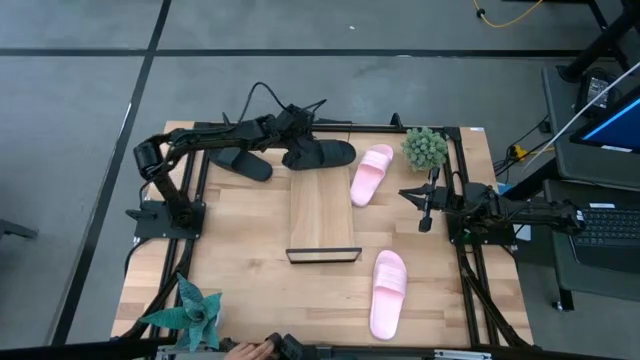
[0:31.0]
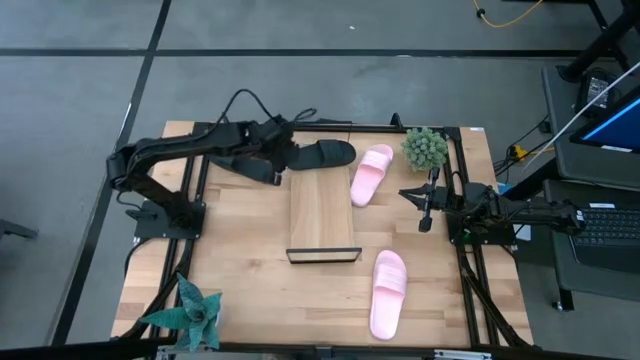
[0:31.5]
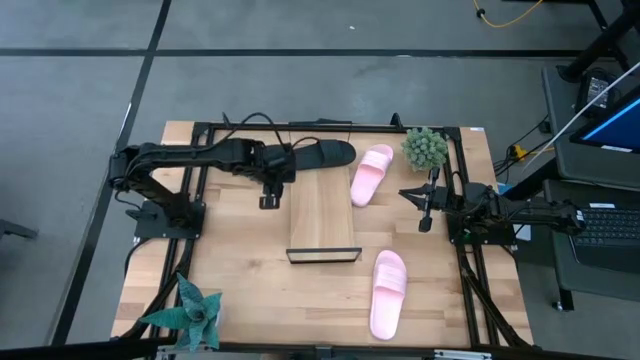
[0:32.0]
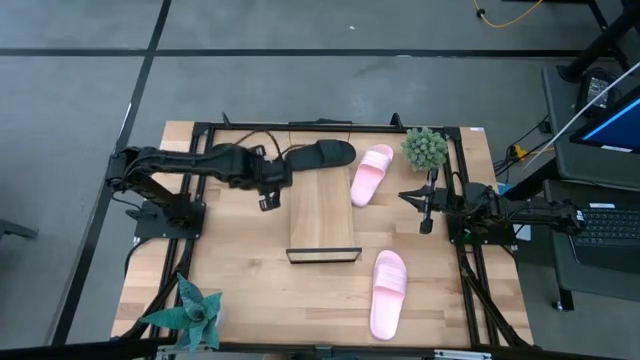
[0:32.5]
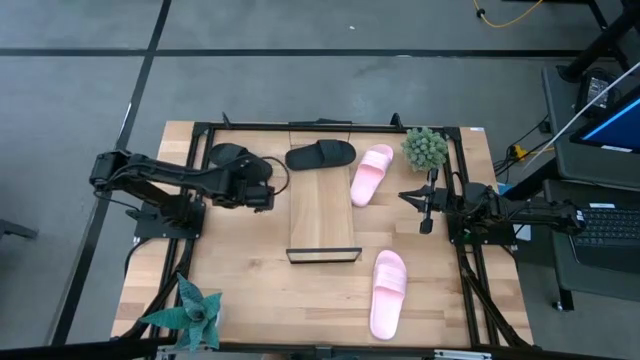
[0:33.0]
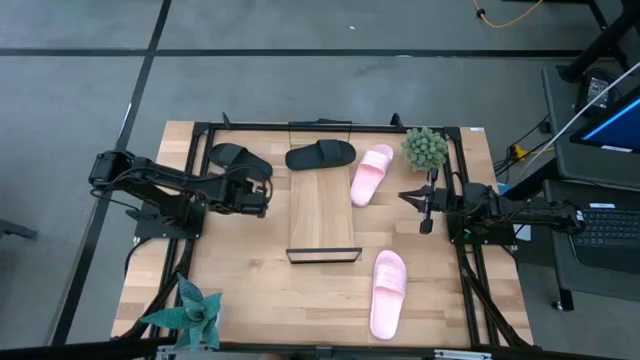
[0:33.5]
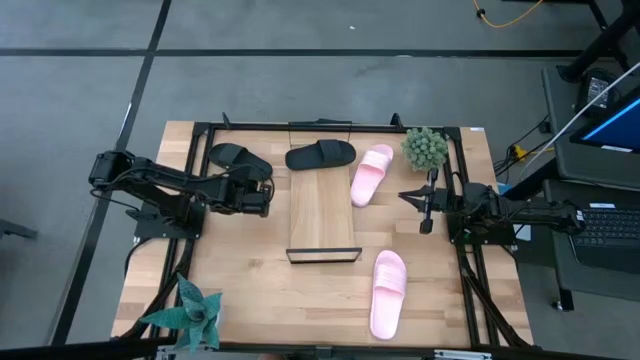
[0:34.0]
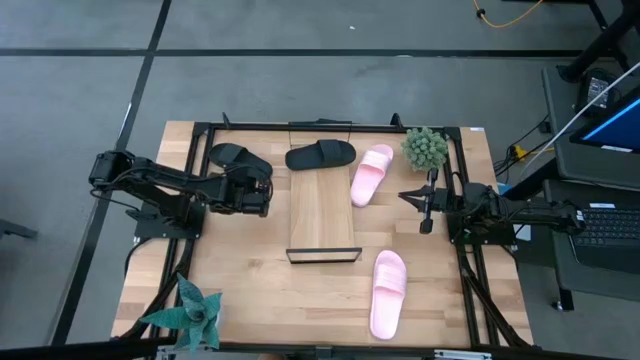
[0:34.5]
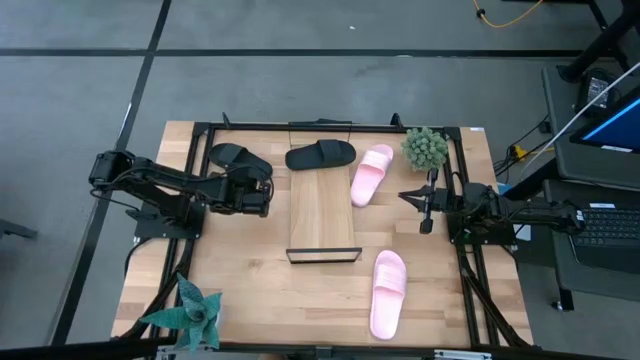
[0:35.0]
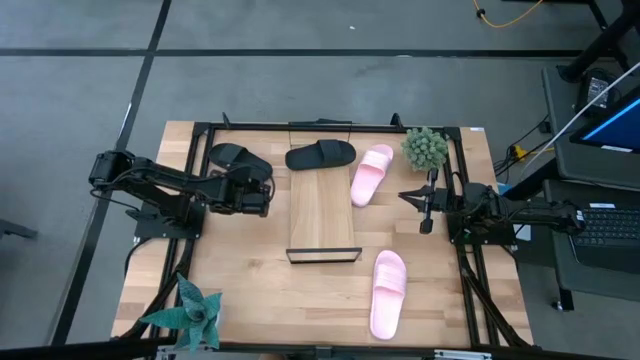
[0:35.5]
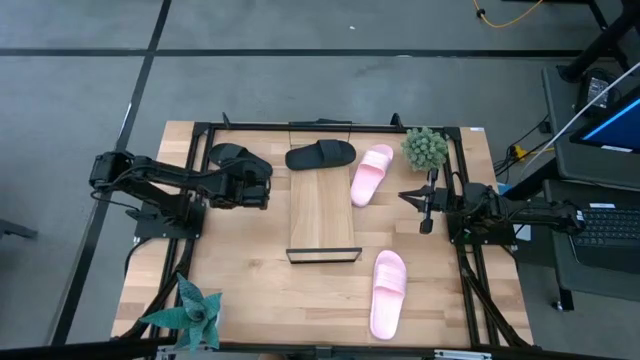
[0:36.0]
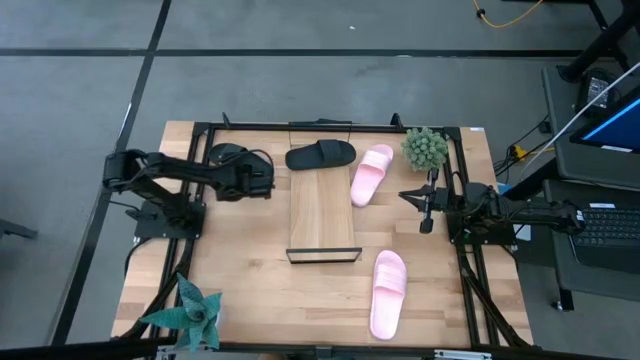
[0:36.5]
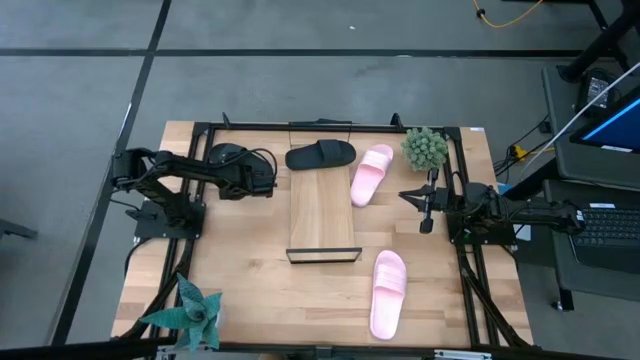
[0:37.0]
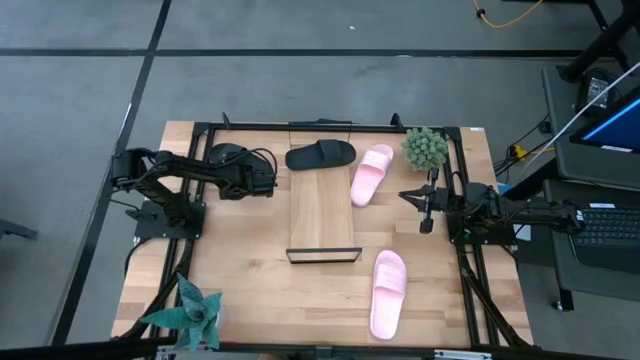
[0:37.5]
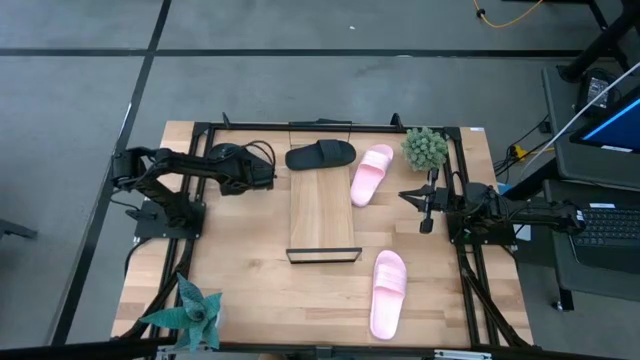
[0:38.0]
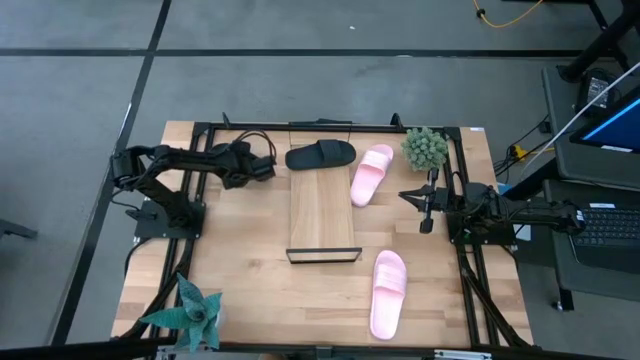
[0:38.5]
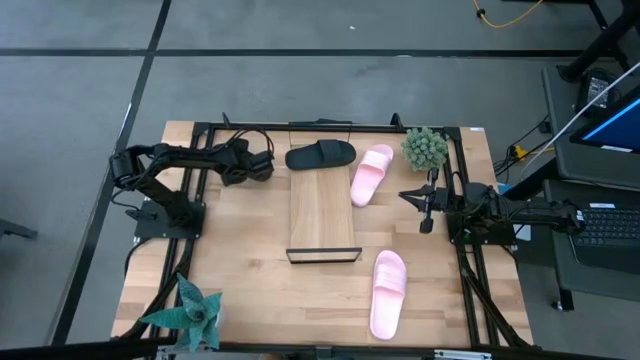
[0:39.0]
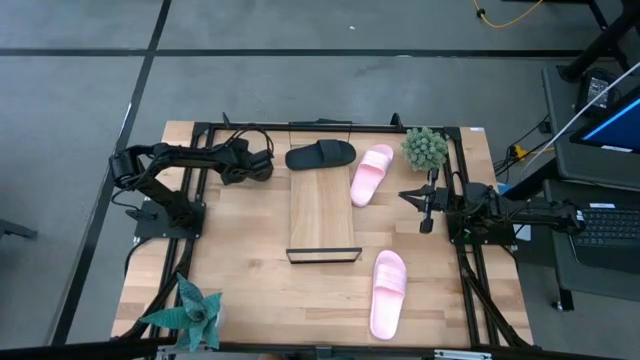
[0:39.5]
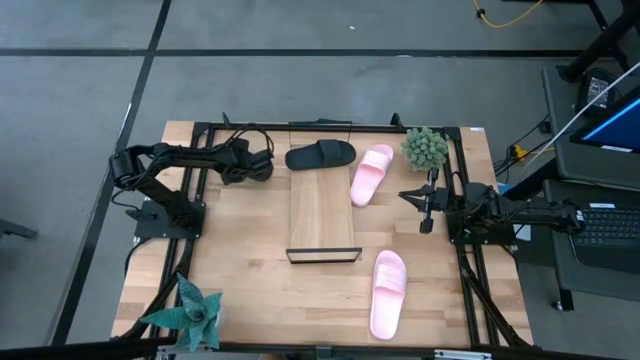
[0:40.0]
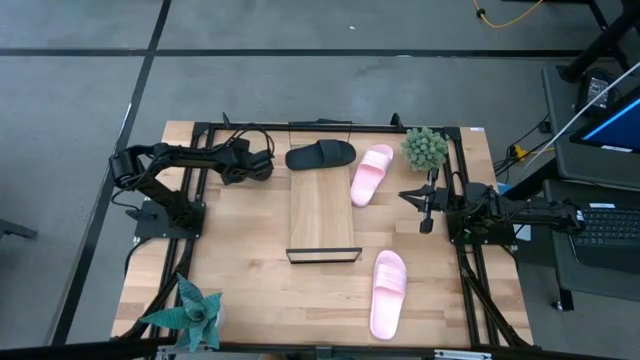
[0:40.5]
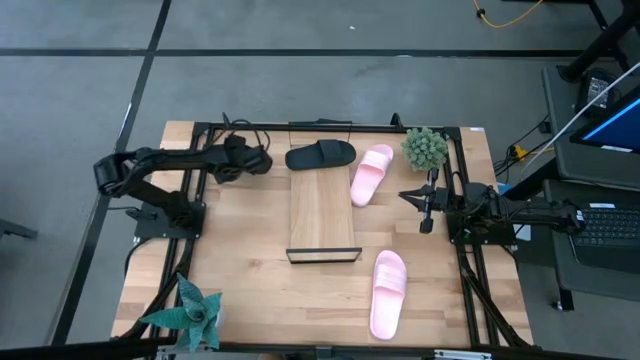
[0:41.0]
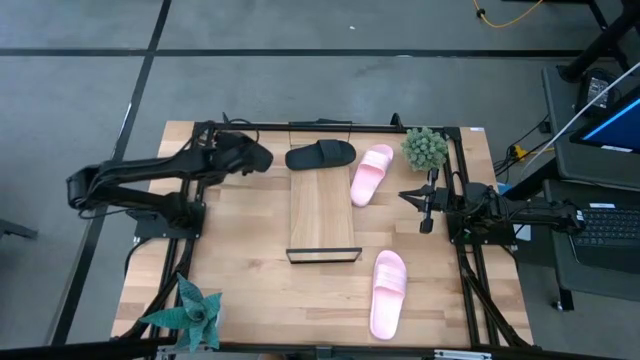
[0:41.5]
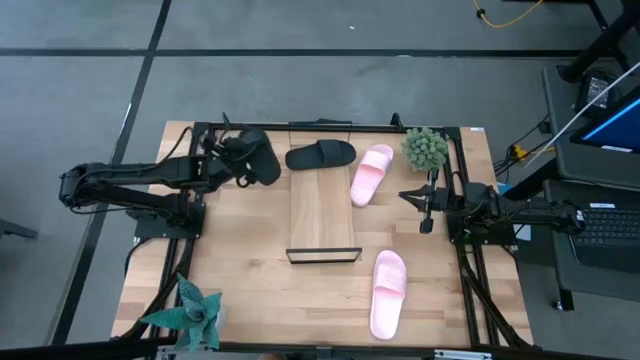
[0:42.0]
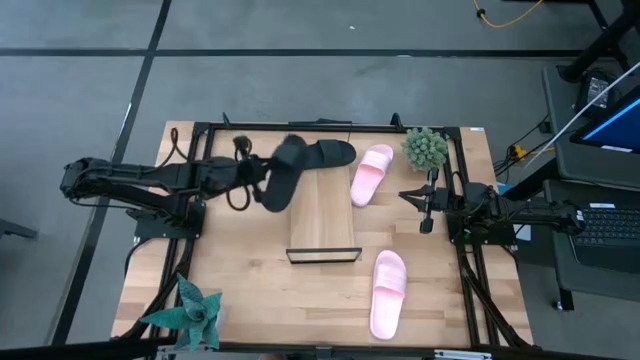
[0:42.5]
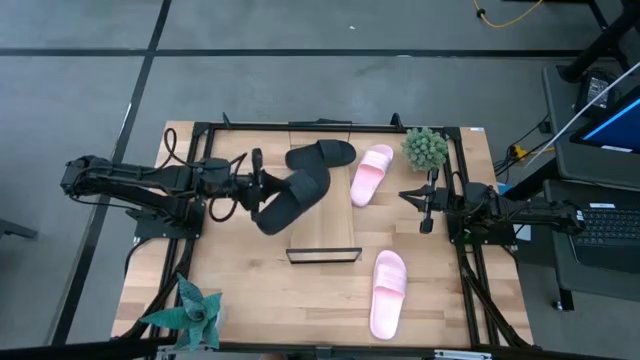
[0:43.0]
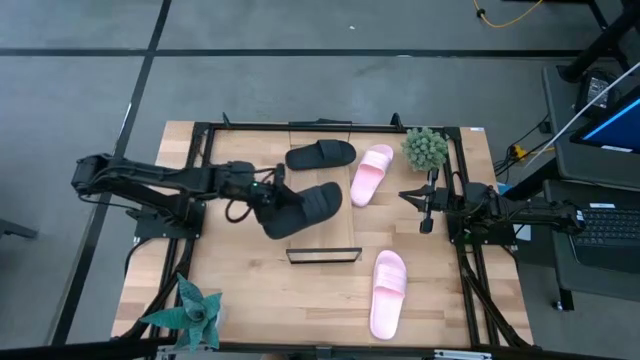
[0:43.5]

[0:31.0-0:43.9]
Task: Pick and place slides into the shelf
Put the black slide on the shelf

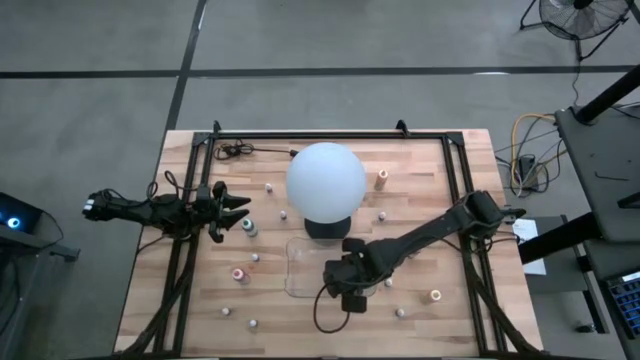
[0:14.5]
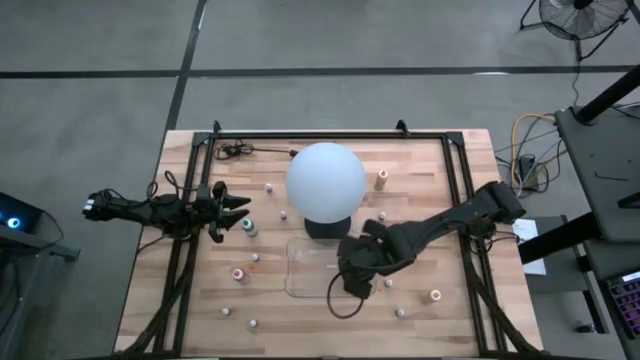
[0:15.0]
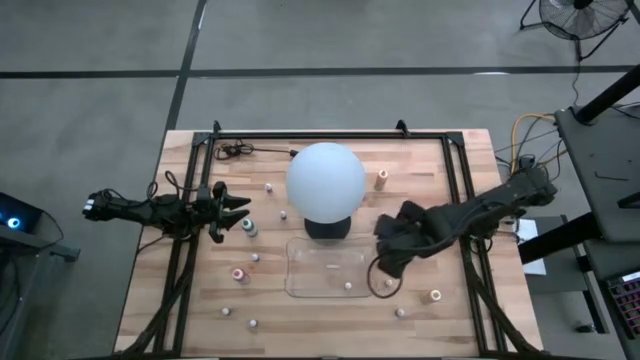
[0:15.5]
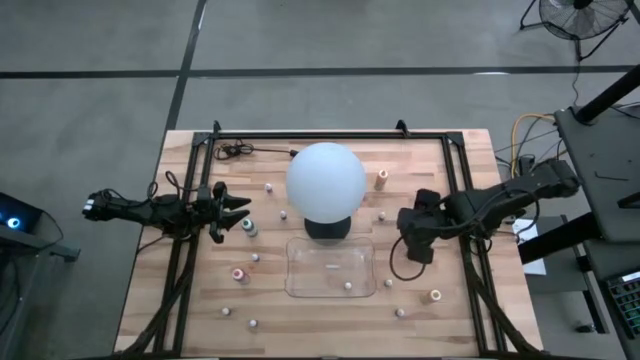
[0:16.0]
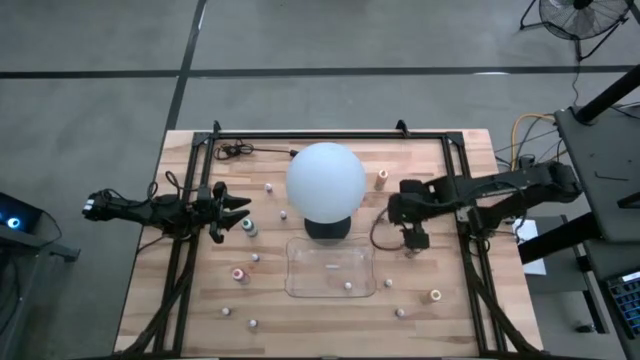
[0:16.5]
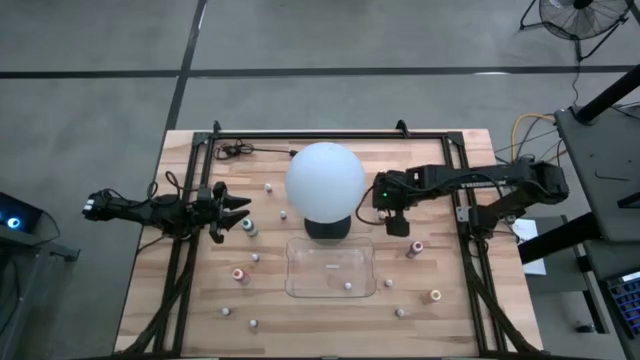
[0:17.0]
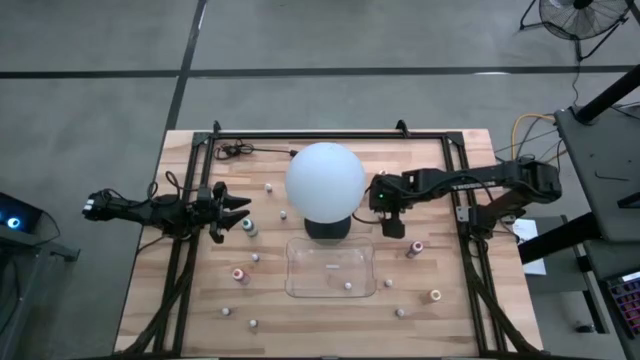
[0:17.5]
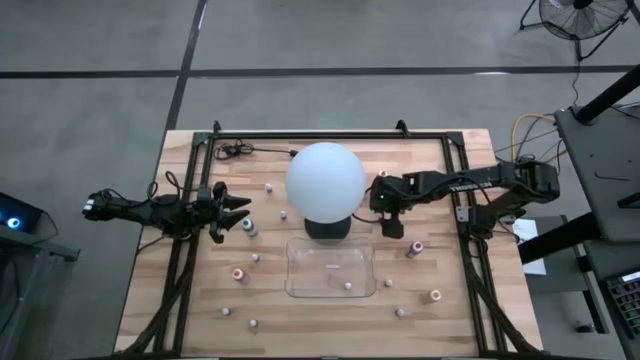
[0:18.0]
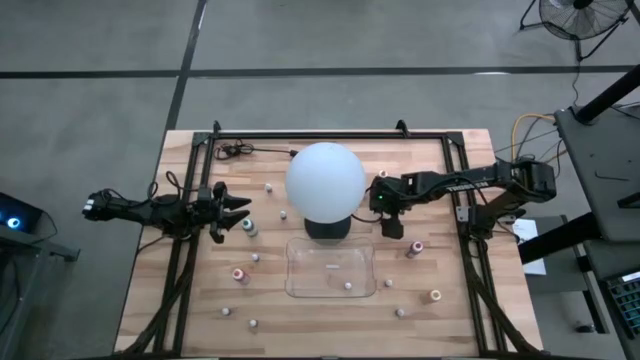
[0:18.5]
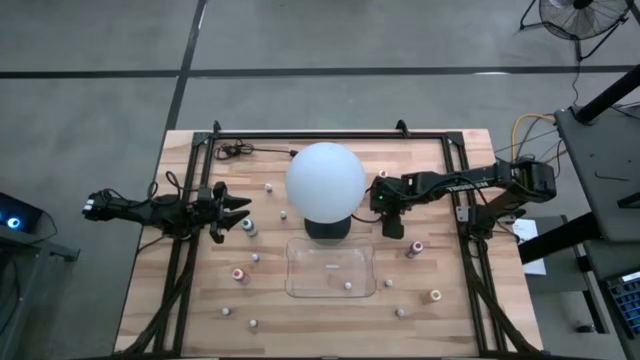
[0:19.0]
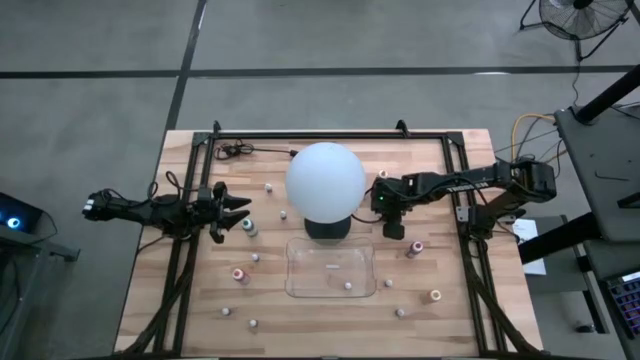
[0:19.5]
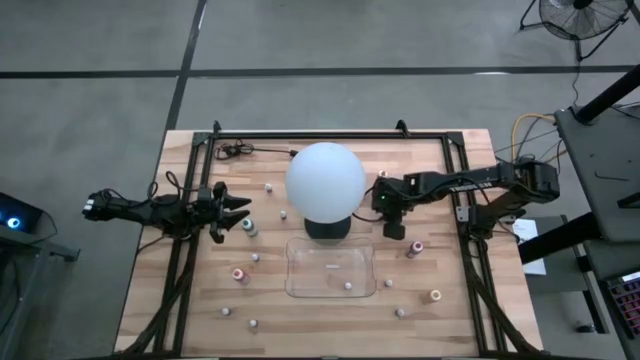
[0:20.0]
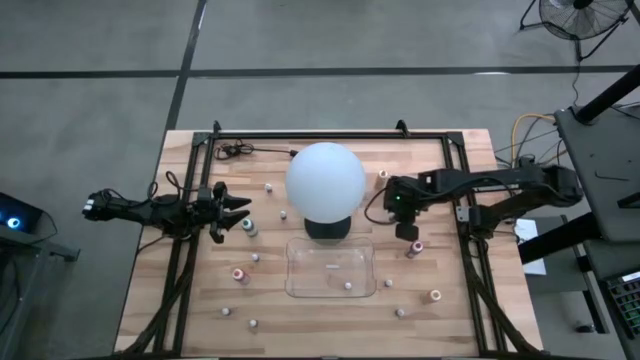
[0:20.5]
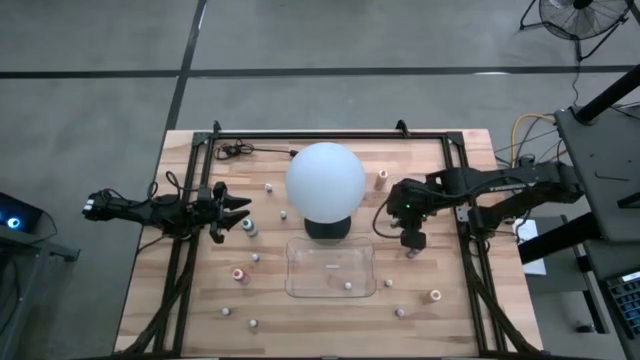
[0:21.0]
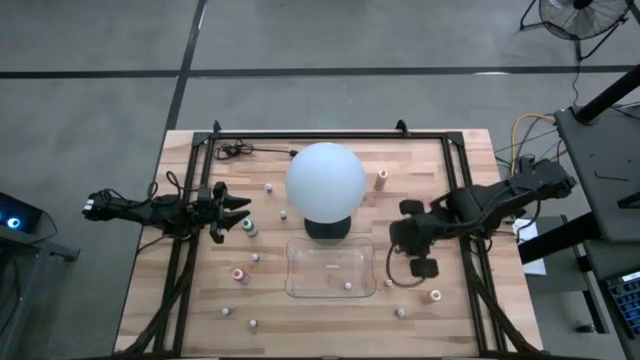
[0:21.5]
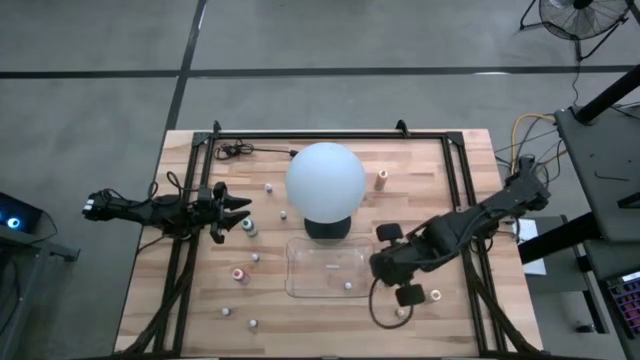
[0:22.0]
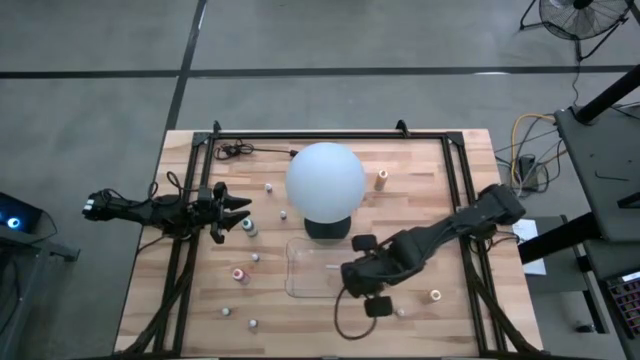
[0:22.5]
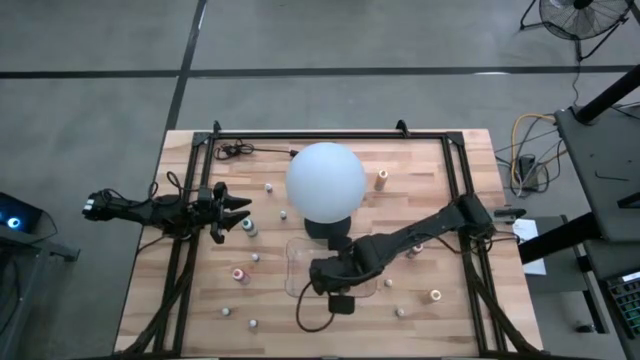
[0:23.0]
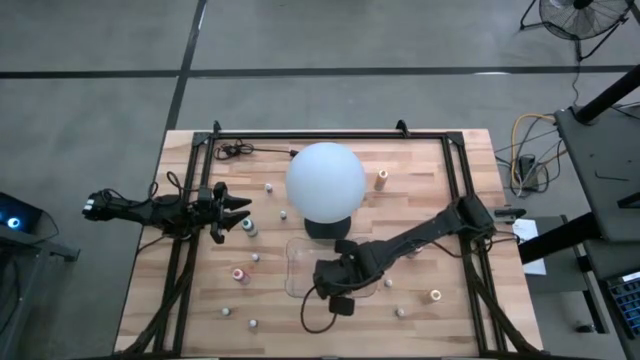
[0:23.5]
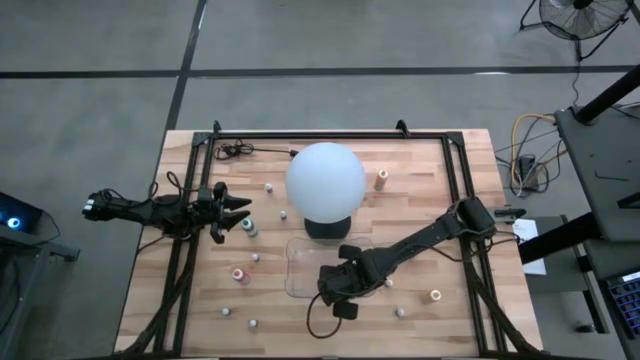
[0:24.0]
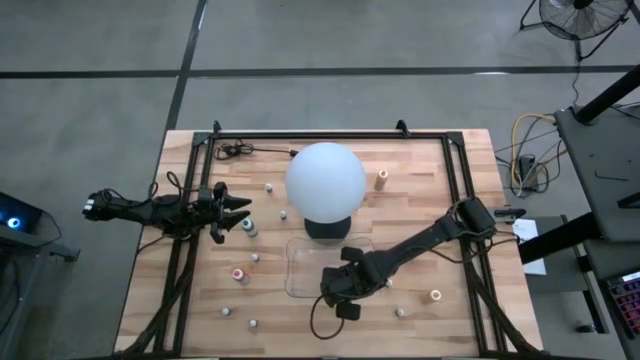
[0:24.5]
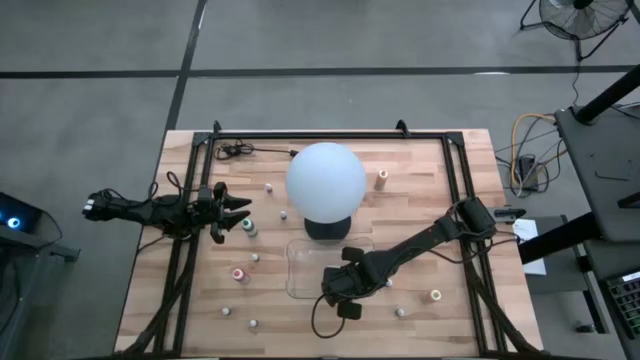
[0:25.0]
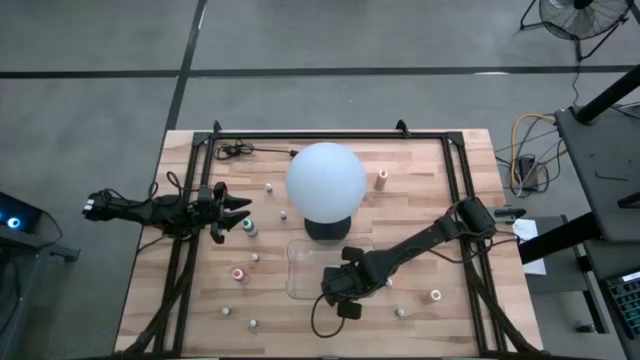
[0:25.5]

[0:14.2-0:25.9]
Task: Pick & Place food coloring
Put the top small green food coloring bottle into the transparent bin
